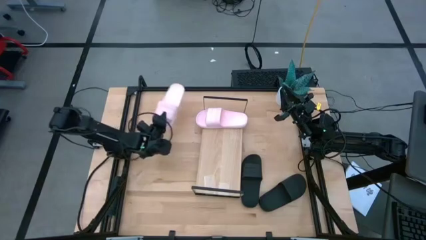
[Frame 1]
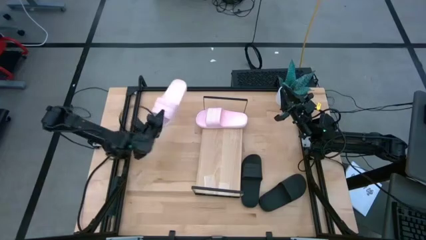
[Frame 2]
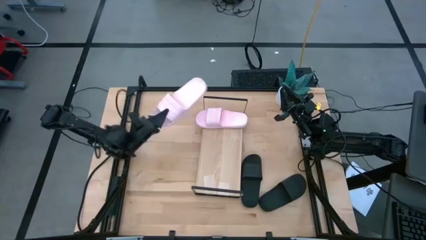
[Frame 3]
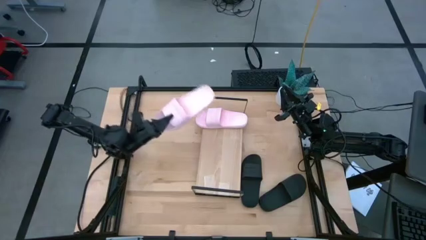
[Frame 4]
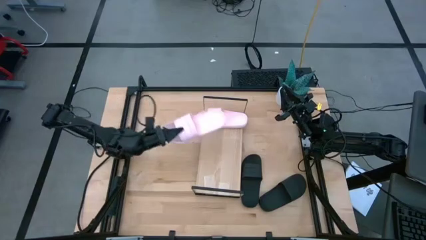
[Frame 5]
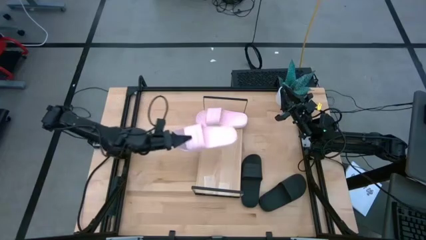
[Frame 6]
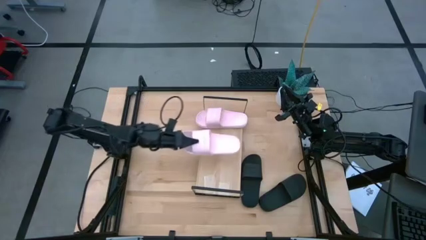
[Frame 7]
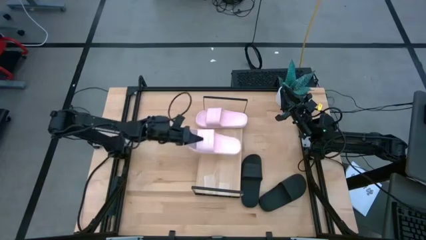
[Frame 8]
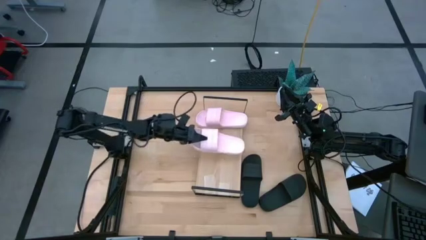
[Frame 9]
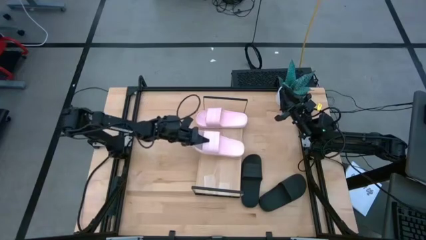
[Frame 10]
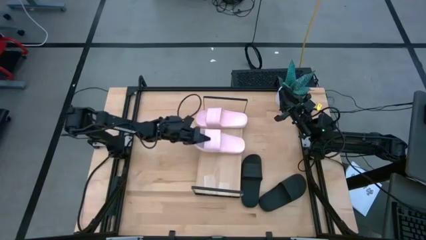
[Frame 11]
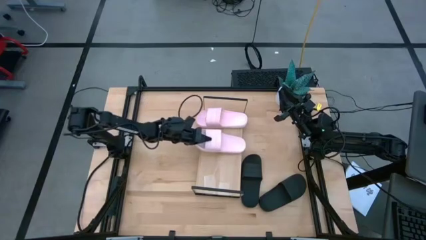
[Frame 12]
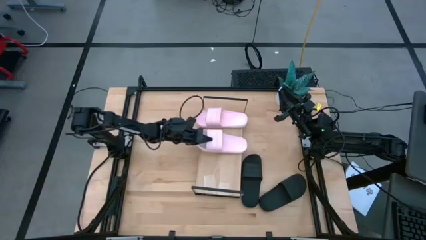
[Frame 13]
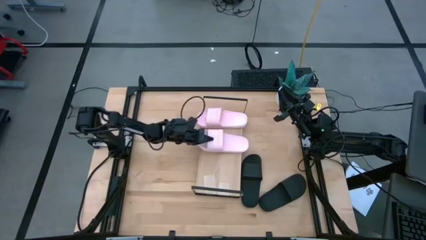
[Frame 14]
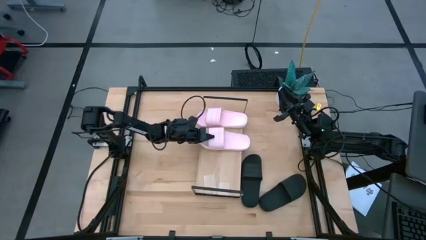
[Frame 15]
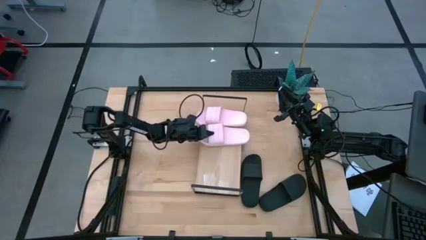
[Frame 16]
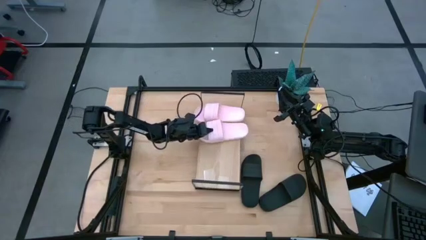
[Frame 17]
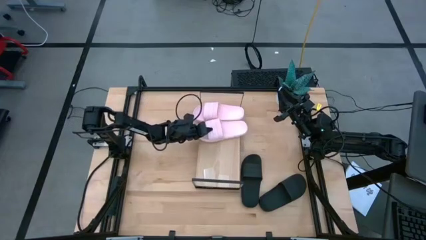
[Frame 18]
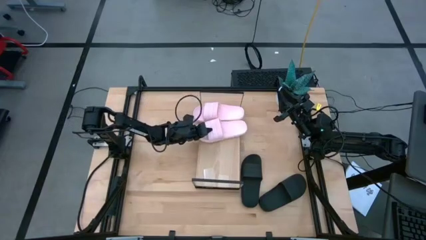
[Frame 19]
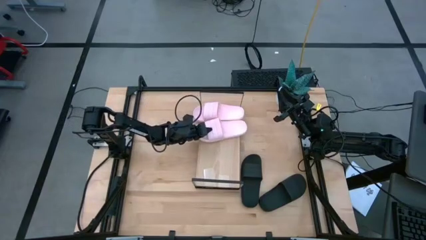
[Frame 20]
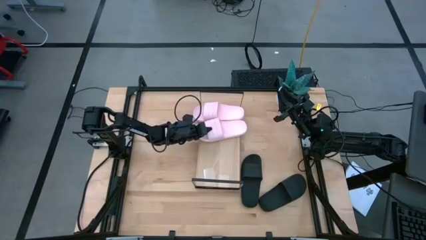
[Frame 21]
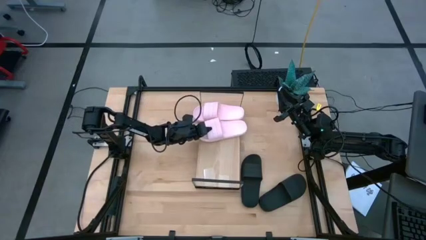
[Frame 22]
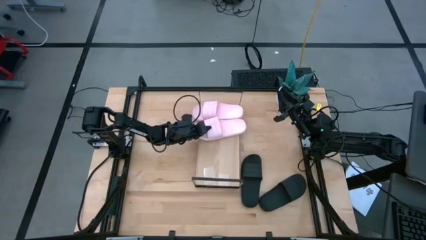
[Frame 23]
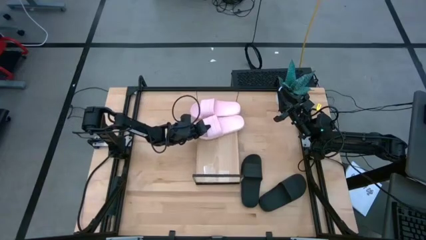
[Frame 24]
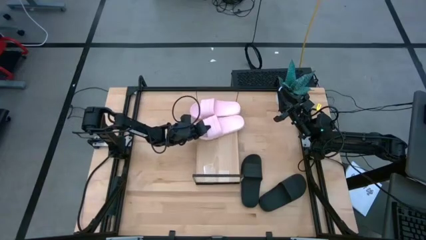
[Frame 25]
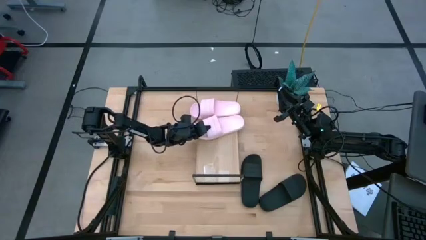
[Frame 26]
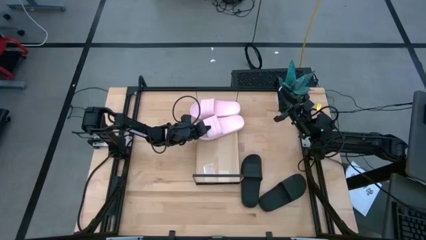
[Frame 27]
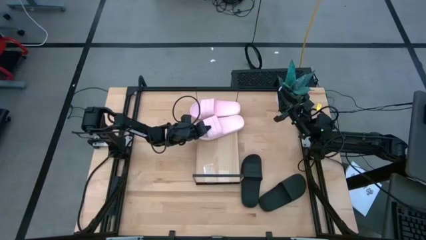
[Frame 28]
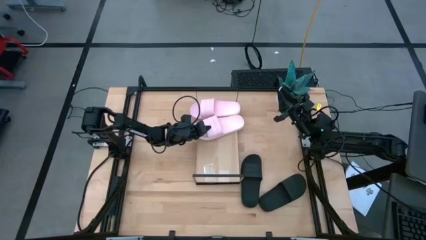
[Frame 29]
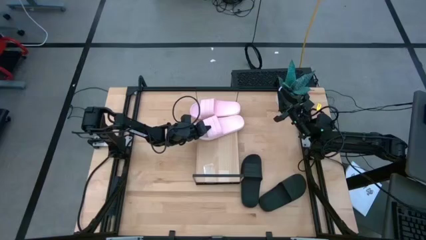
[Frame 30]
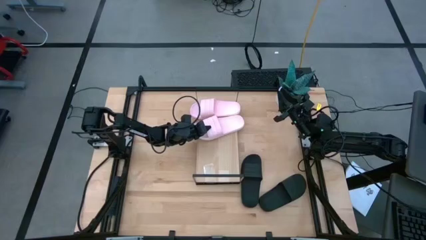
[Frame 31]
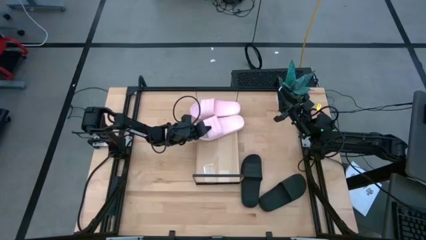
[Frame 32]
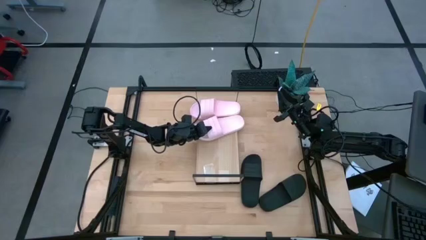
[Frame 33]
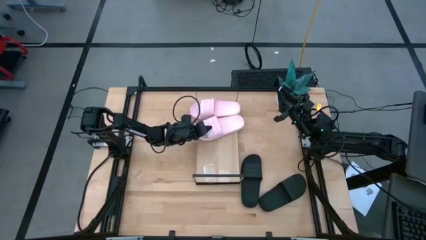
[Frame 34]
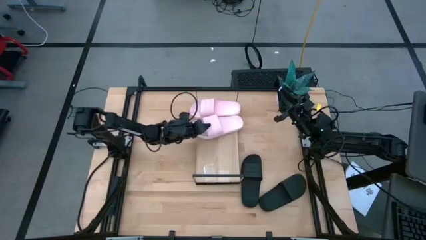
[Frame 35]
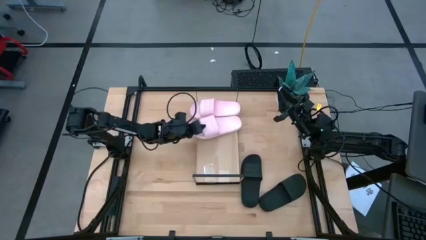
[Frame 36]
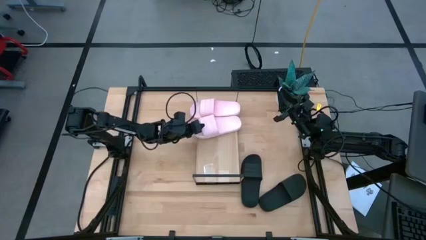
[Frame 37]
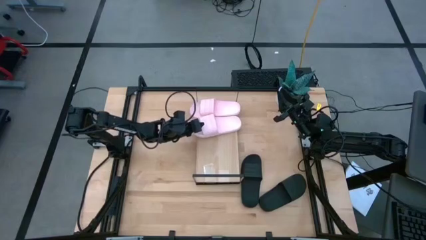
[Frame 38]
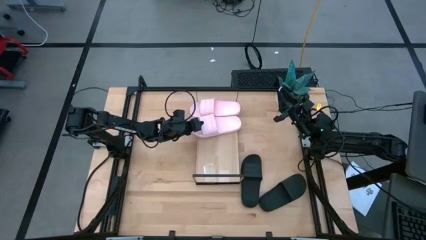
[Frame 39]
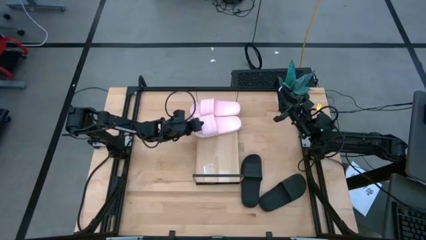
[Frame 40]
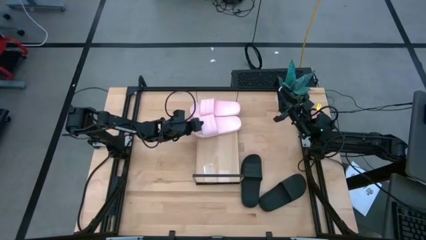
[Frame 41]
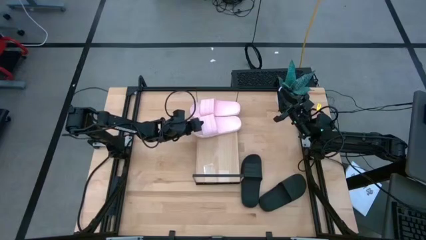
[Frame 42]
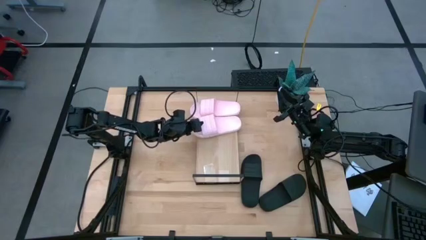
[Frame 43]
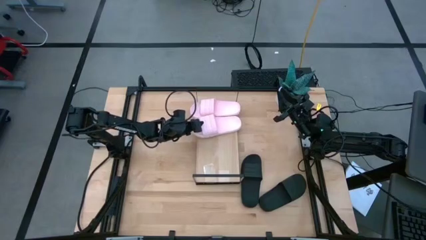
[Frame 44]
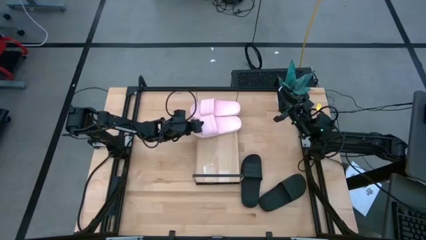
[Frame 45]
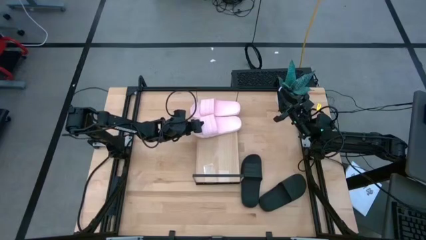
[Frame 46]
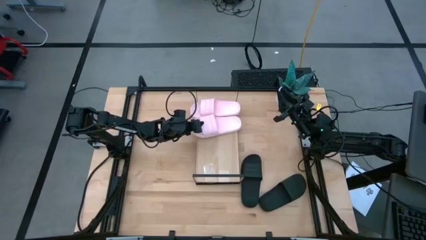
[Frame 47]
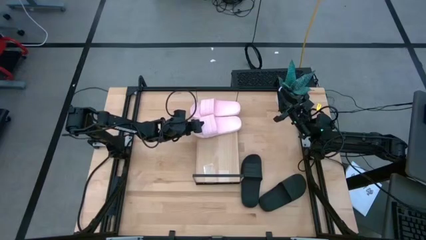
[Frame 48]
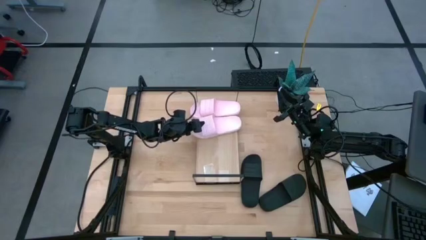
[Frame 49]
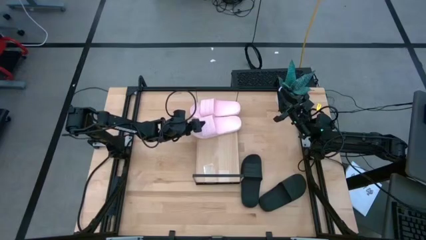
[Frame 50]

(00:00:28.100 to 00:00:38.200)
Task: Pick and place slides into the shelf
Put the pink slide on the shelf
